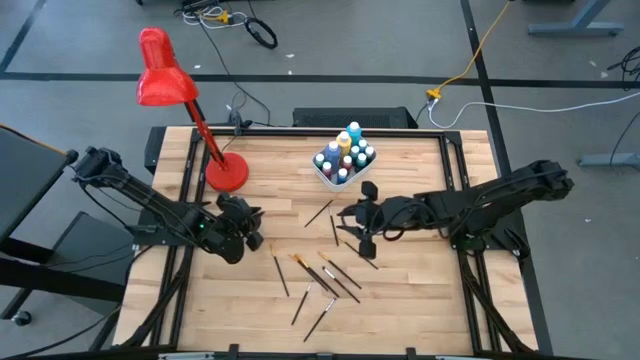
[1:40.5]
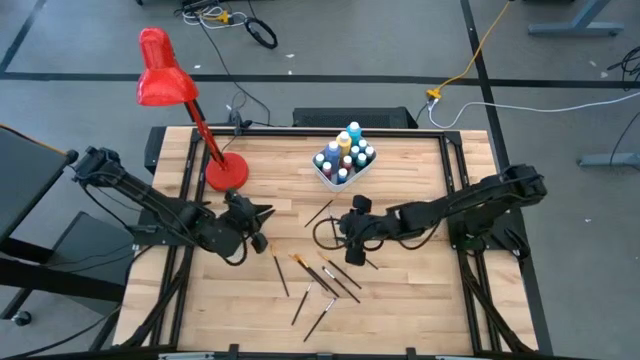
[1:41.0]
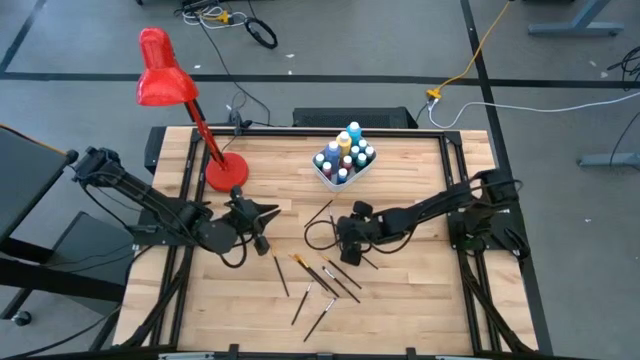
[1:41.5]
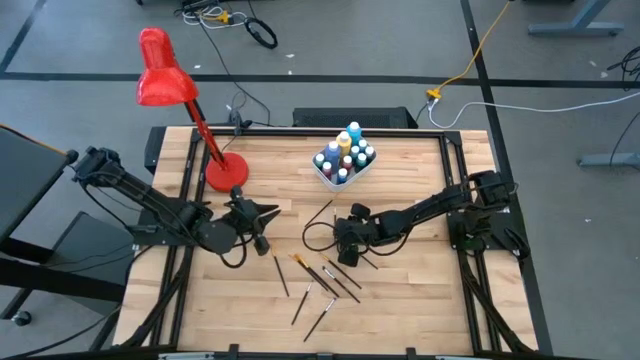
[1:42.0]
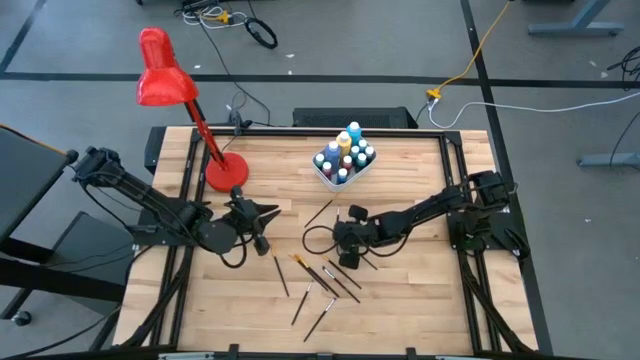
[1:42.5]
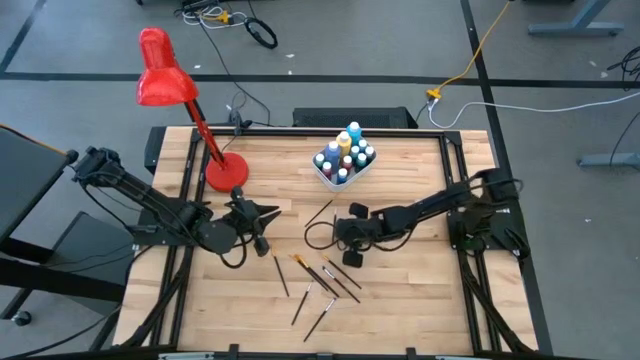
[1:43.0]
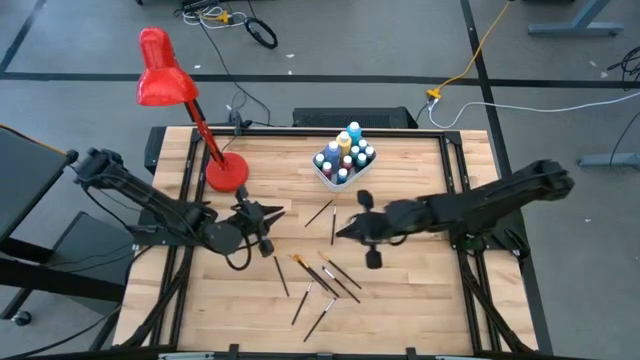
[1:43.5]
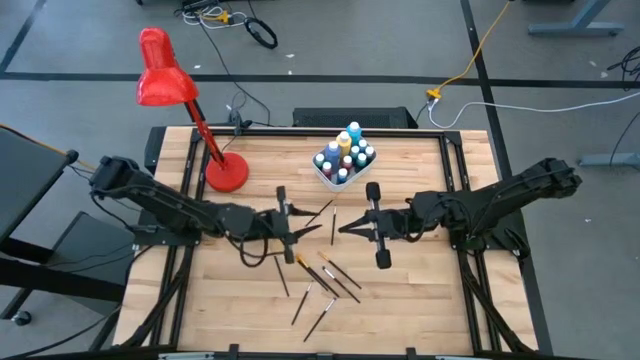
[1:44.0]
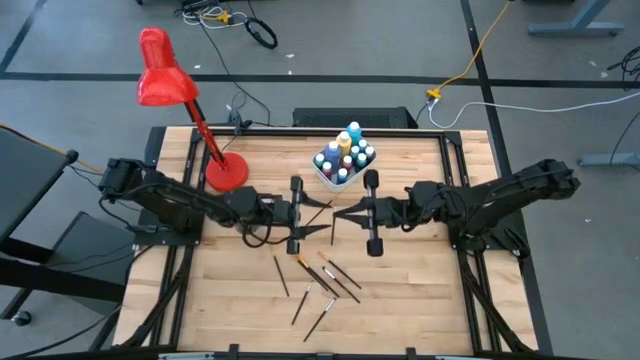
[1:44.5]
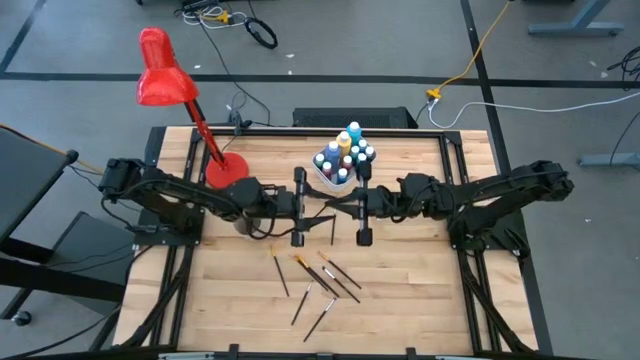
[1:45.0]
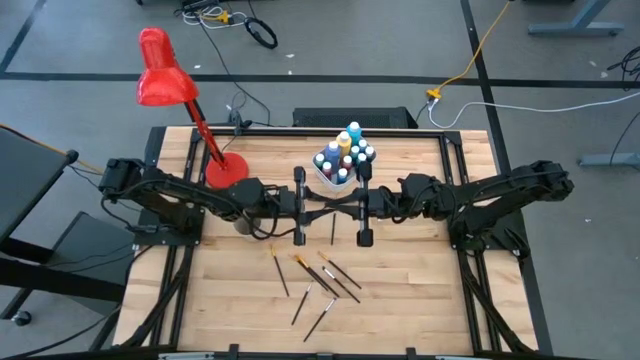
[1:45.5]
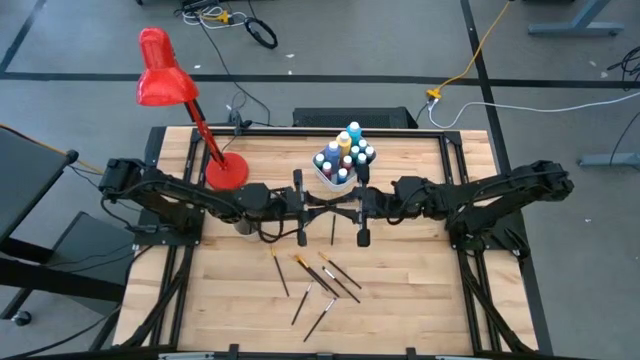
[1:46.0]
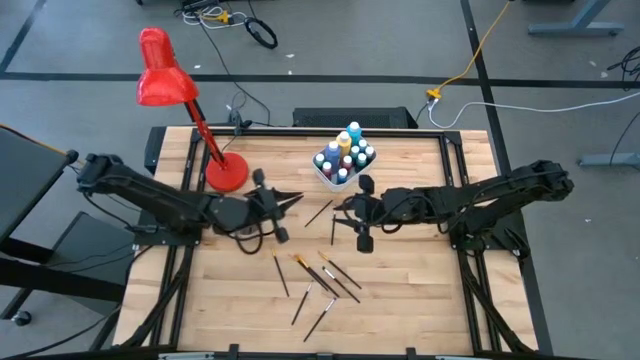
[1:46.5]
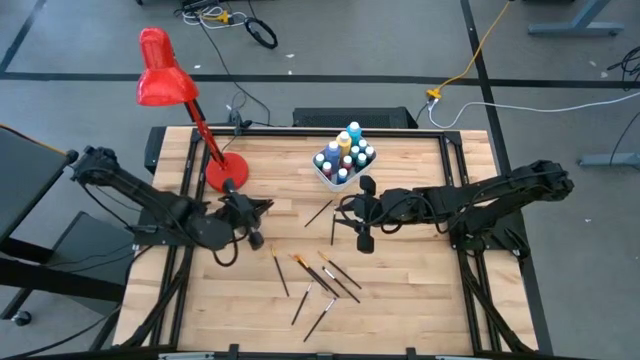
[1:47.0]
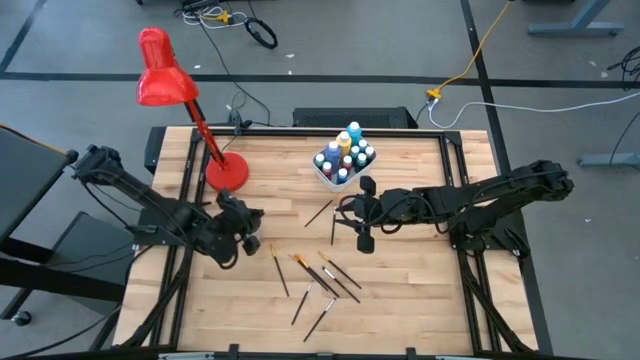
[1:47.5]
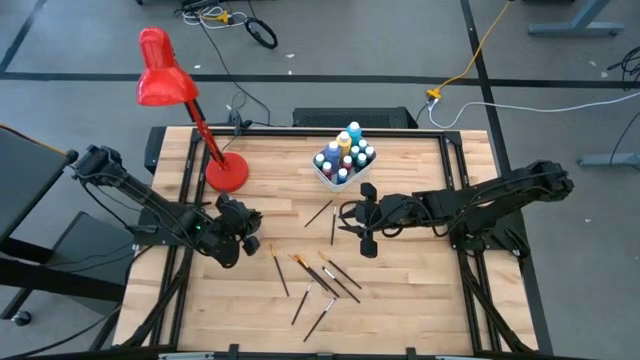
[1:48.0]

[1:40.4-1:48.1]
Task: Pick & Place Paint Supplies
Put the gold paint brush into the white cup

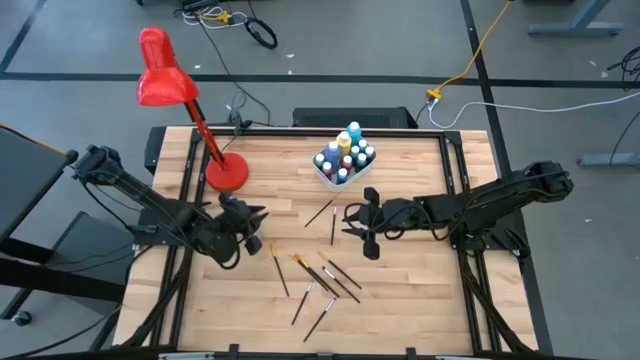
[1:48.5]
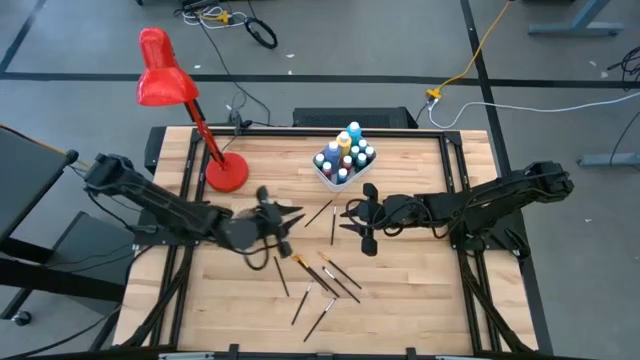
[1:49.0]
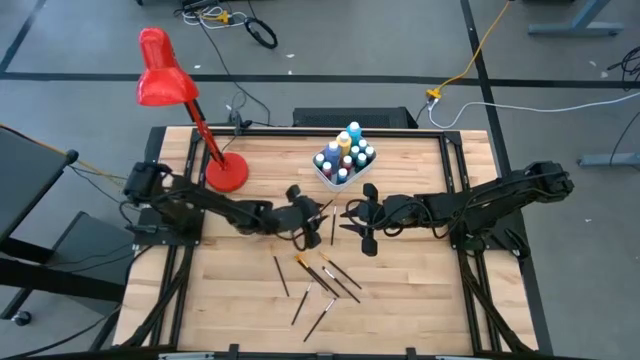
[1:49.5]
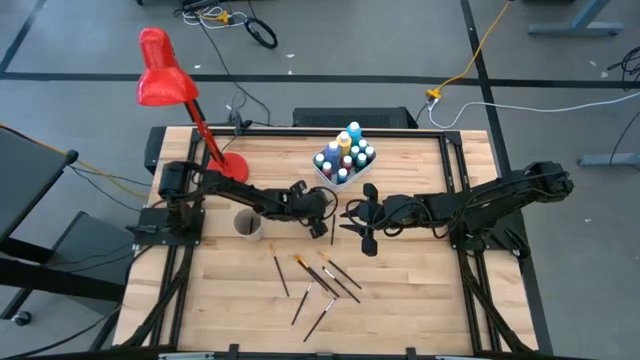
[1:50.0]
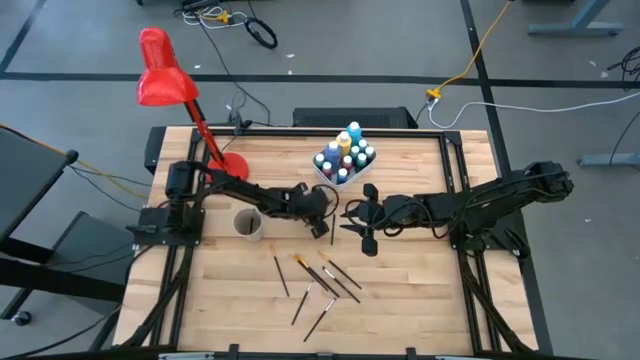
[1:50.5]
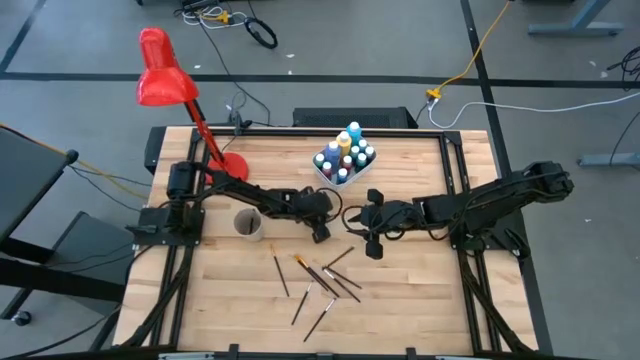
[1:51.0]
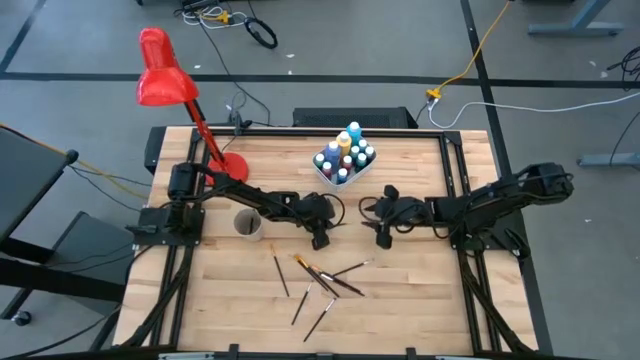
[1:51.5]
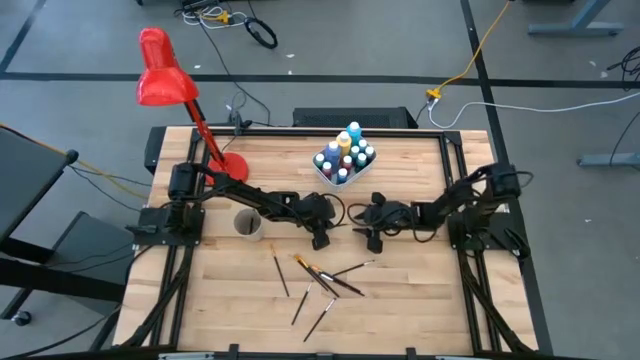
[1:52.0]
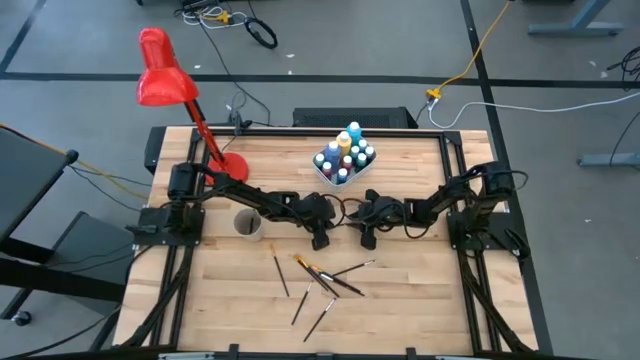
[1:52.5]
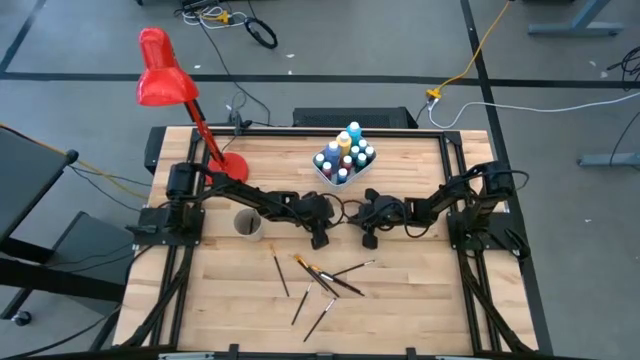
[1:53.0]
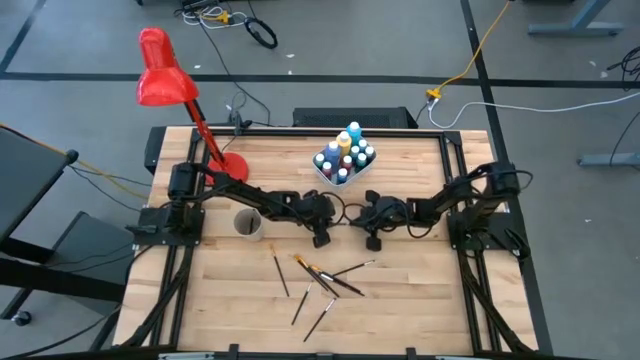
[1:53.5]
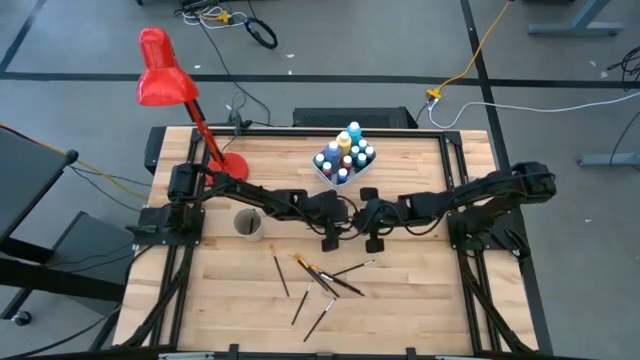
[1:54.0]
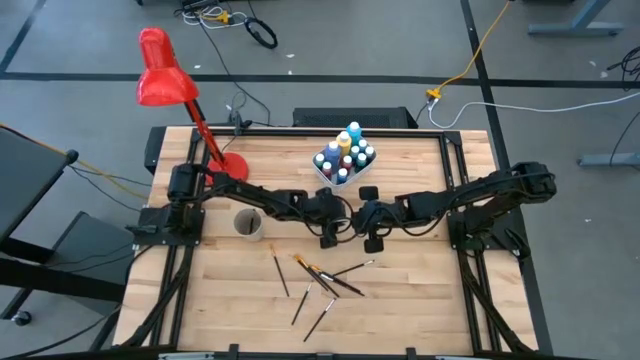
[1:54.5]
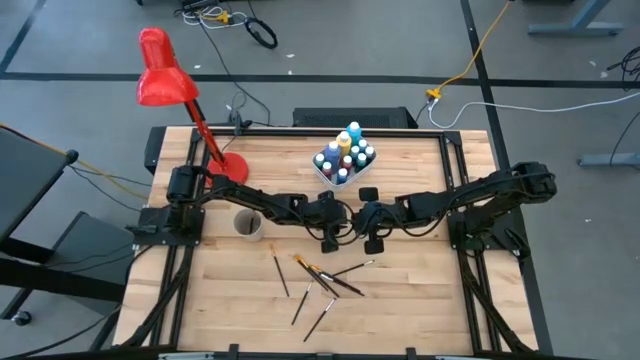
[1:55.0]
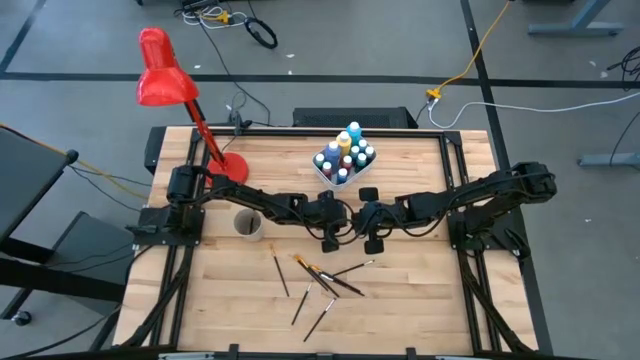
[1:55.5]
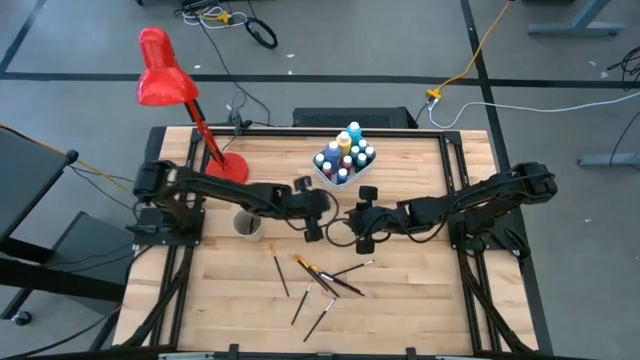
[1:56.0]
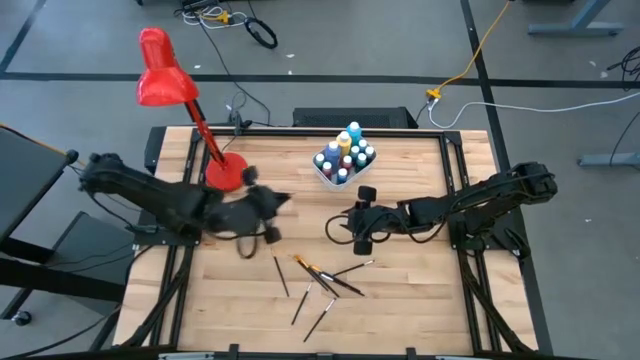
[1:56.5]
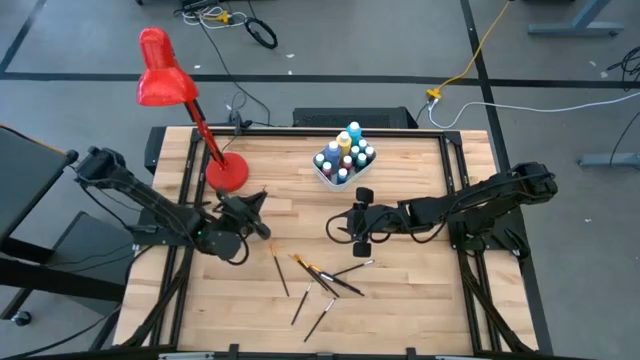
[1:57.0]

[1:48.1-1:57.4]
Put the gold paint brush into the white cup

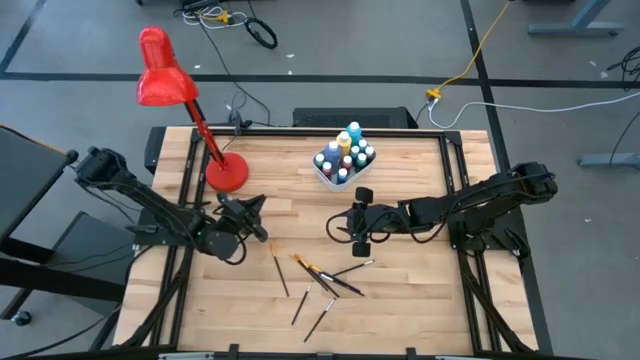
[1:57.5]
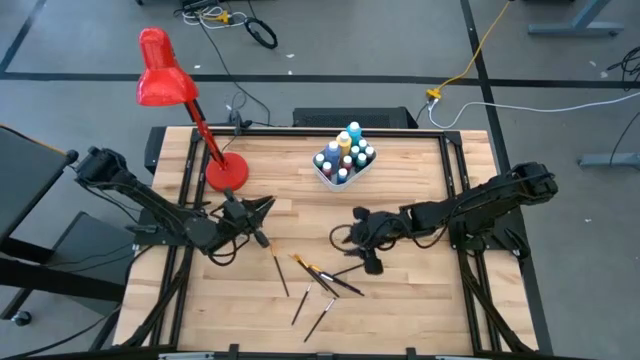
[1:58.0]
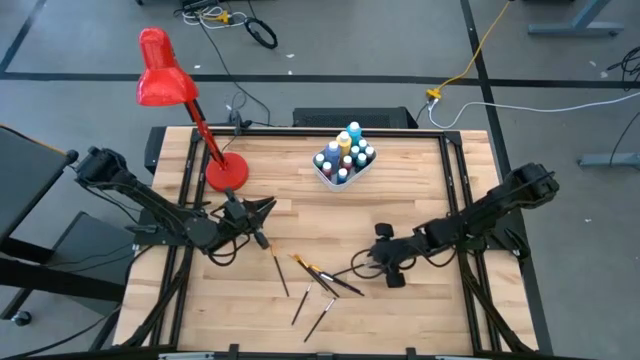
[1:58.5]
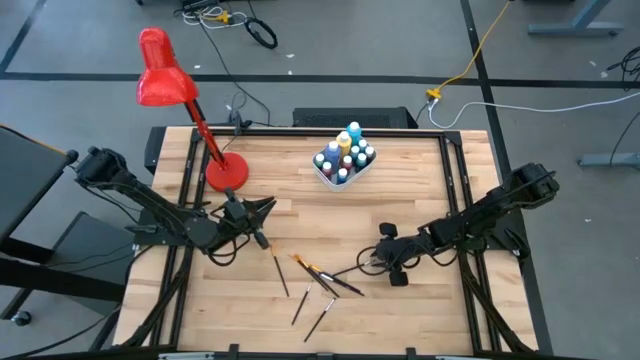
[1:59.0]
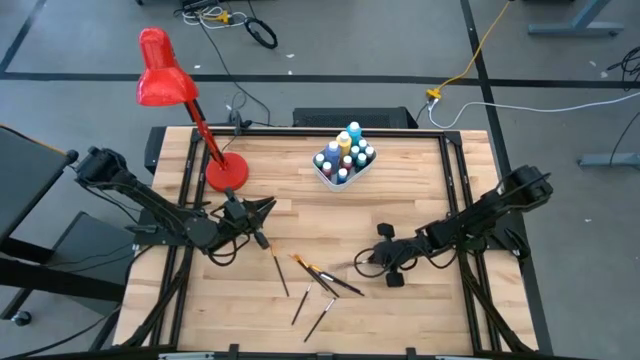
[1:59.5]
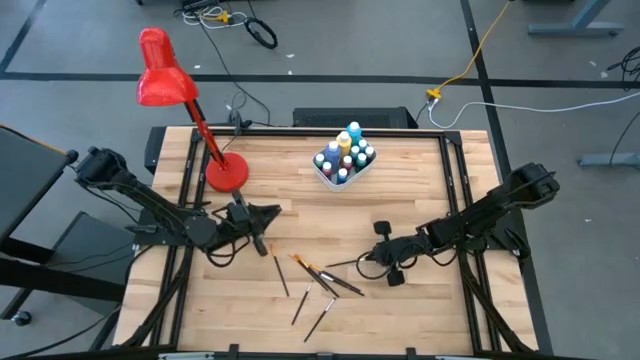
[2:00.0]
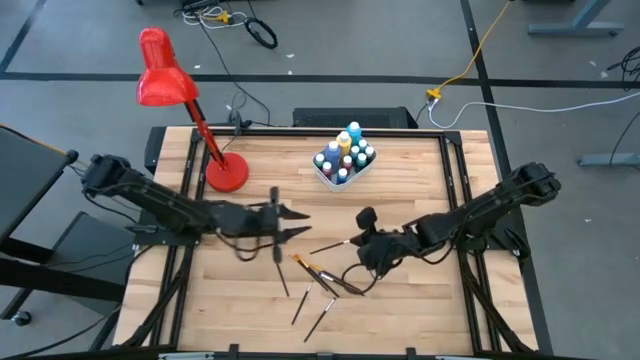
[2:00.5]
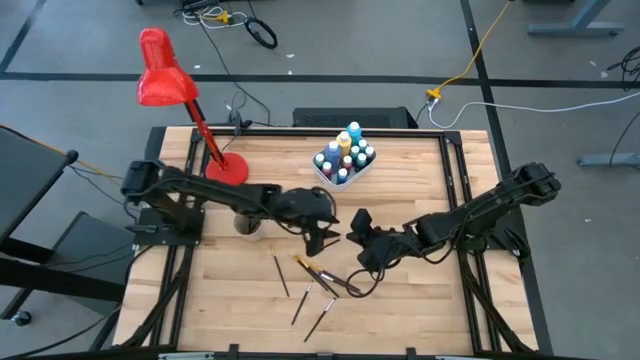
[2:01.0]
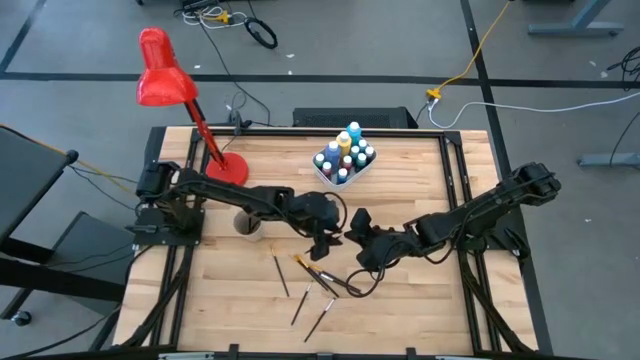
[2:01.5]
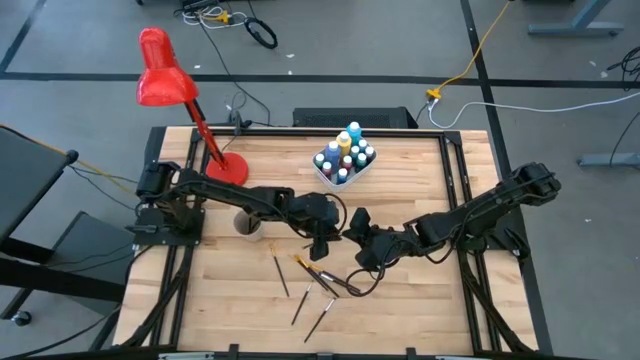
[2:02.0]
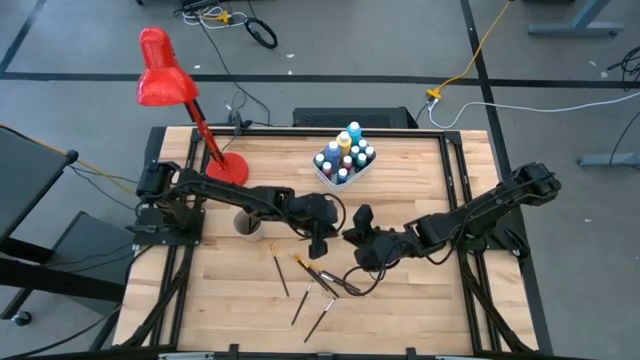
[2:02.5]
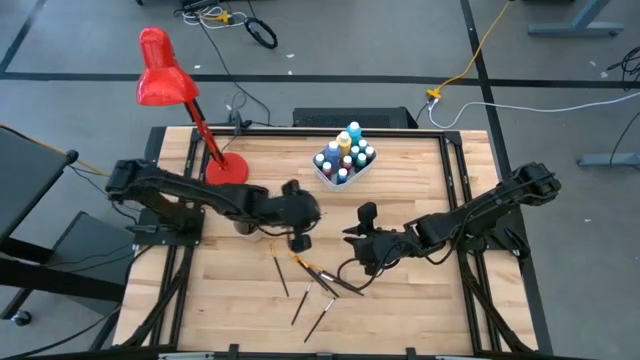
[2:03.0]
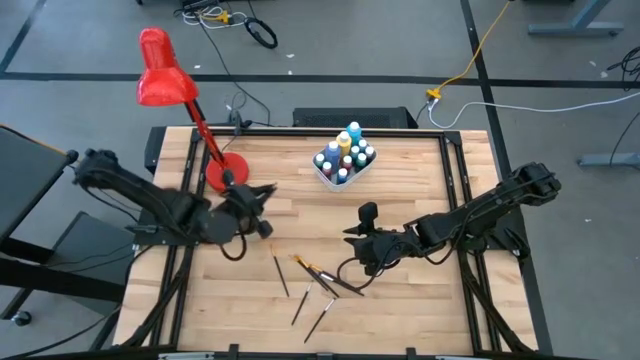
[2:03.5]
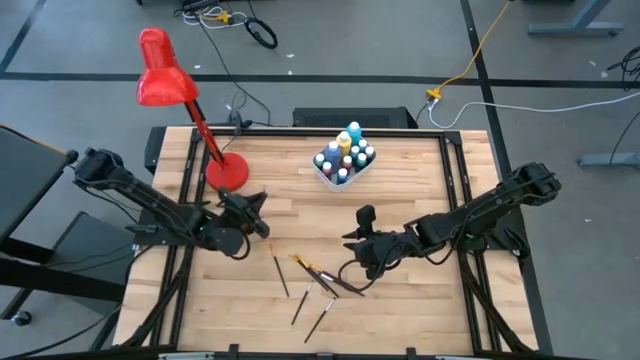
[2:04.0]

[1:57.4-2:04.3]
Put the silver paint brush into the white cup
